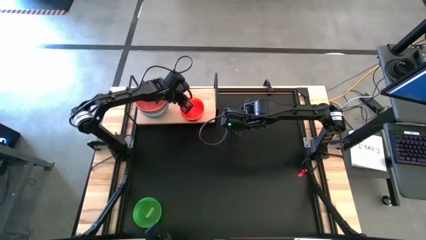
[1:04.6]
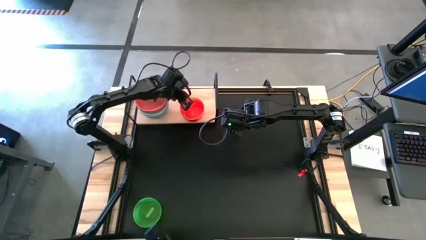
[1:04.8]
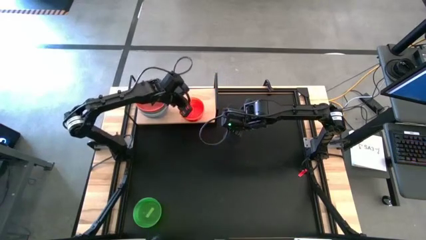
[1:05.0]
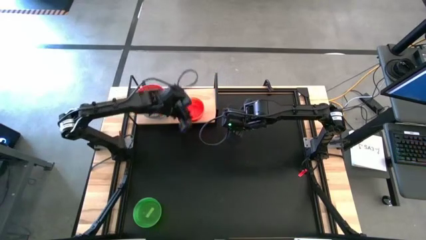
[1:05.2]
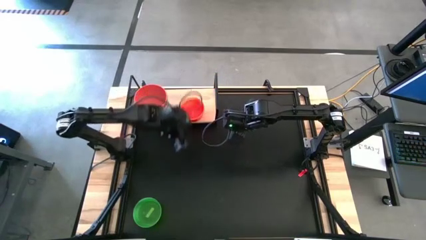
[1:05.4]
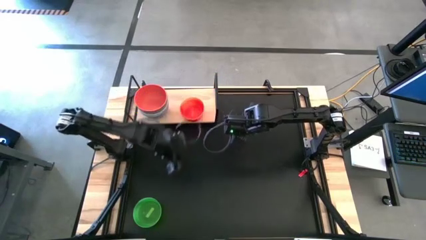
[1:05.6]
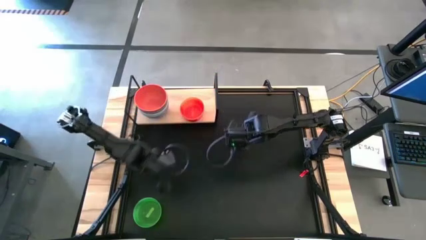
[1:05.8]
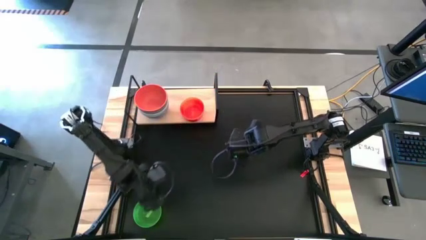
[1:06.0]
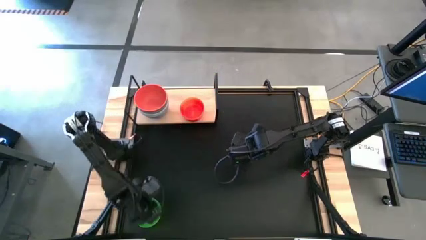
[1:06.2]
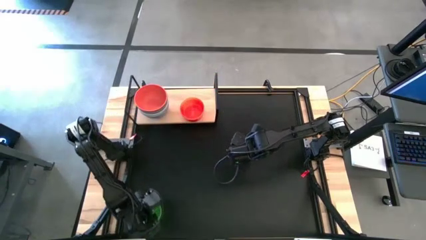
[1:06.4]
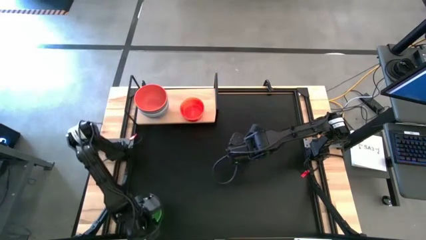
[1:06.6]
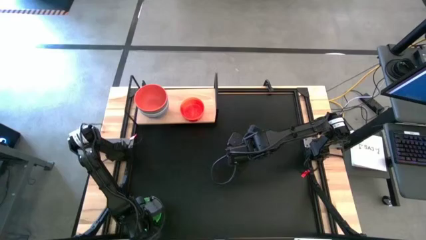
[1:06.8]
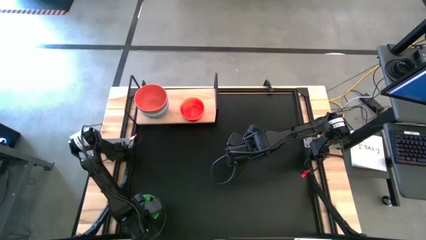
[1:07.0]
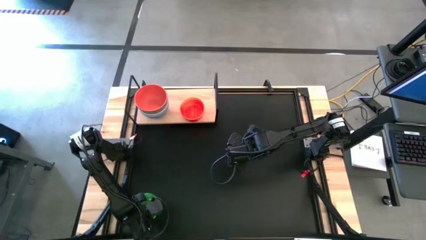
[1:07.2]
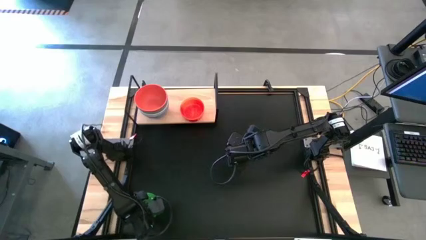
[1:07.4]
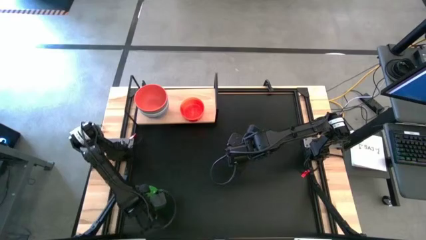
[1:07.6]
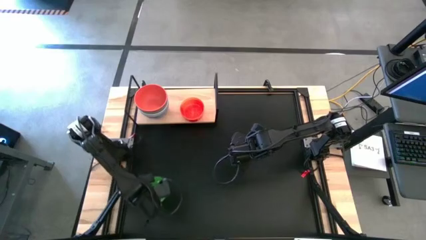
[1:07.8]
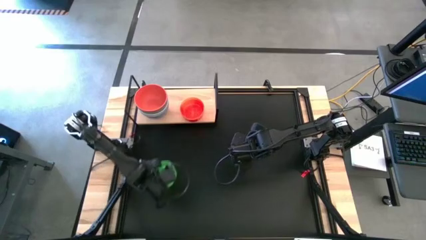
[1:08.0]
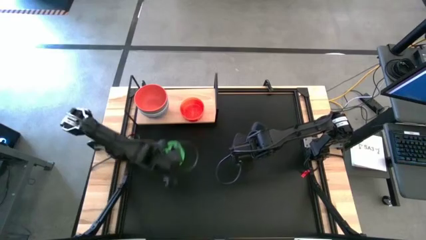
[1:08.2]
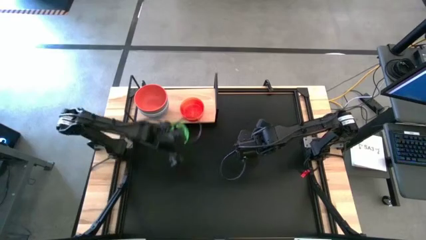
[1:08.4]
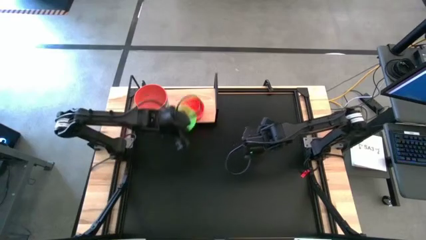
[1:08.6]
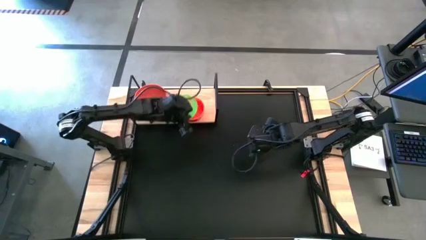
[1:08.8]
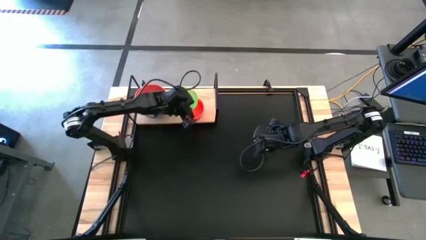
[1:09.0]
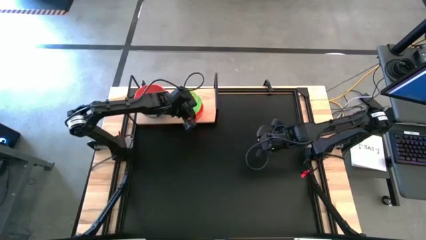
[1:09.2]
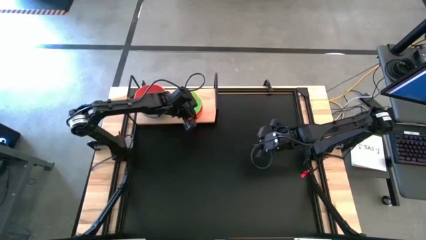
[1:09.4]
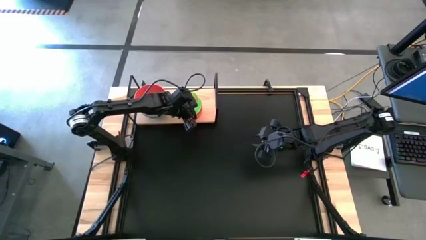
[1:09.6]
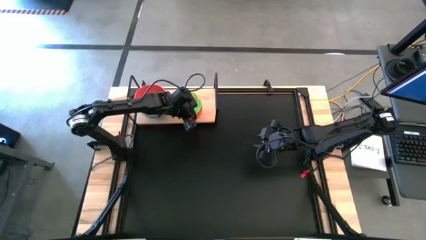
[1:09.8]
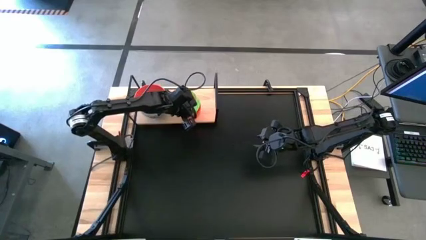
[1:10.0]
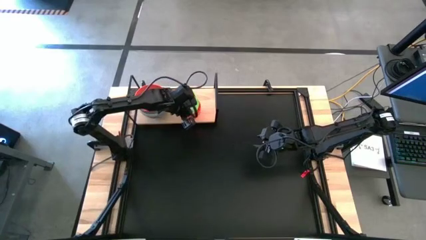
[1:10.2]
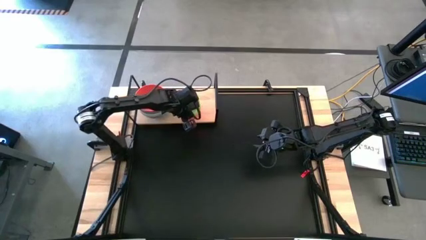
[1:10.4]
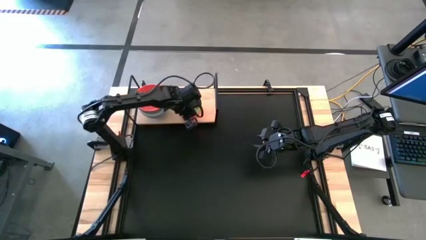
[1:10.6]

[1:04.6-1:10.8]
Task: Place and stack bowls onto a shelf
Stack the light green bowl on top of the light orange bowl on the shelf

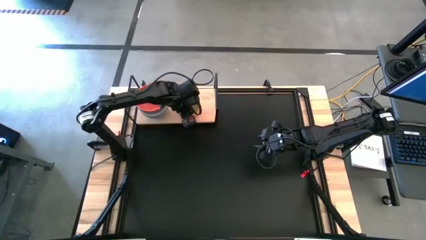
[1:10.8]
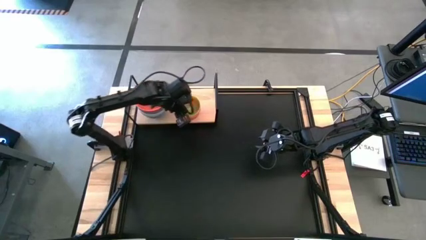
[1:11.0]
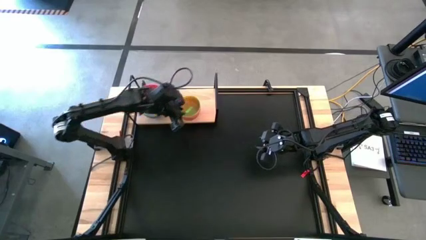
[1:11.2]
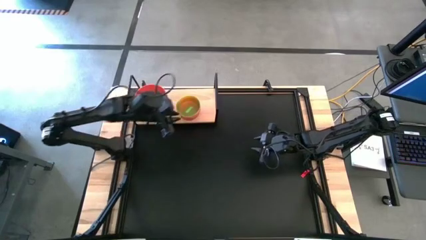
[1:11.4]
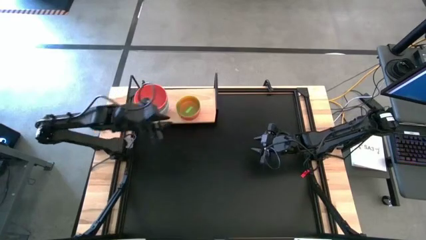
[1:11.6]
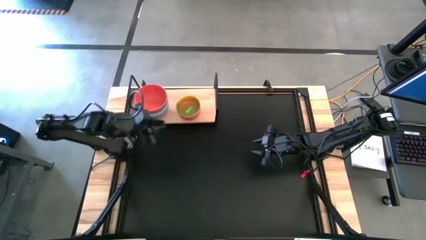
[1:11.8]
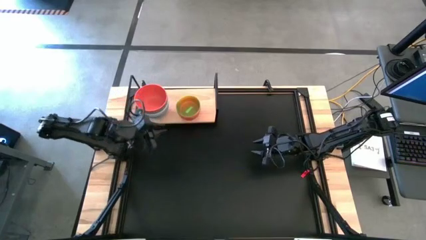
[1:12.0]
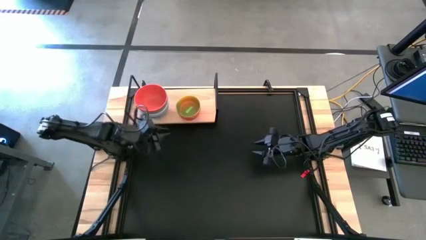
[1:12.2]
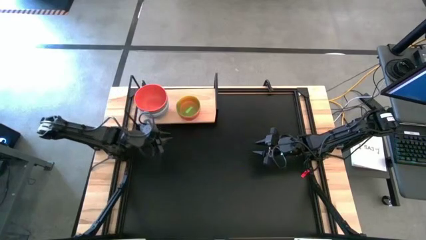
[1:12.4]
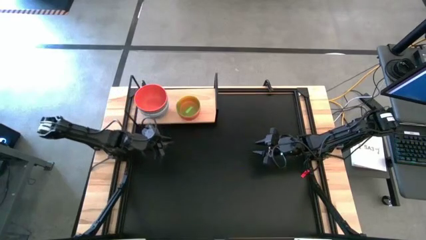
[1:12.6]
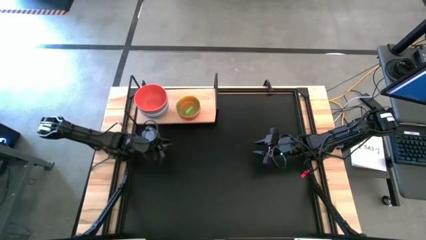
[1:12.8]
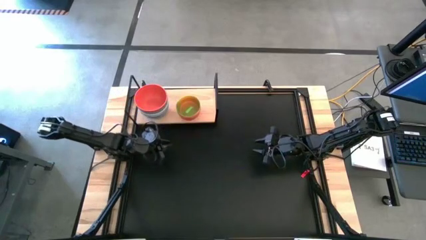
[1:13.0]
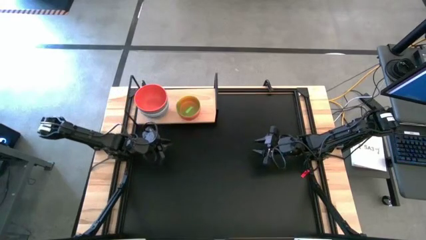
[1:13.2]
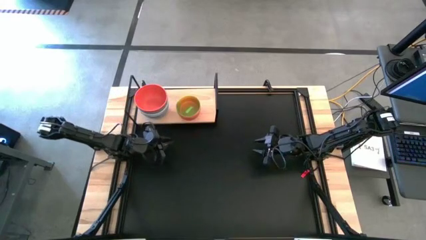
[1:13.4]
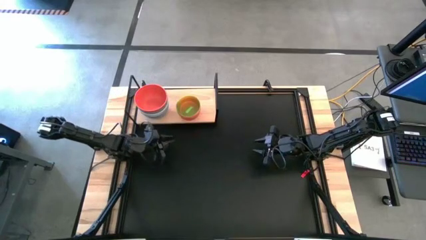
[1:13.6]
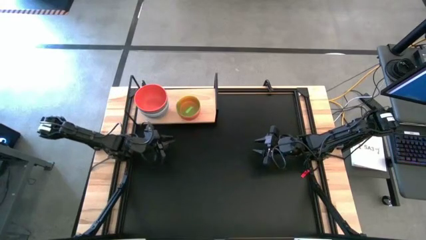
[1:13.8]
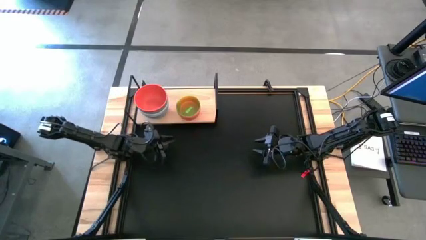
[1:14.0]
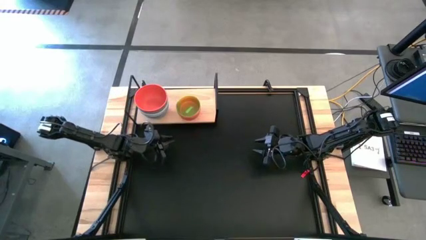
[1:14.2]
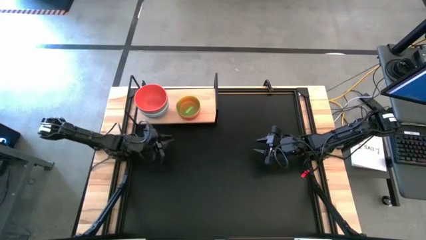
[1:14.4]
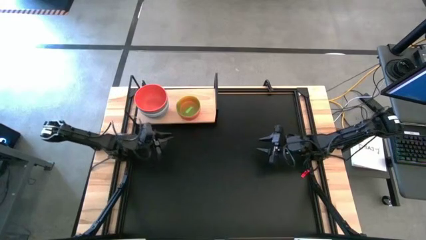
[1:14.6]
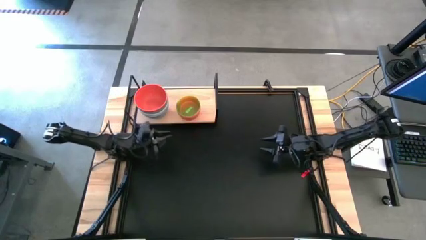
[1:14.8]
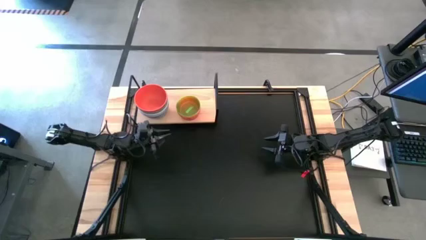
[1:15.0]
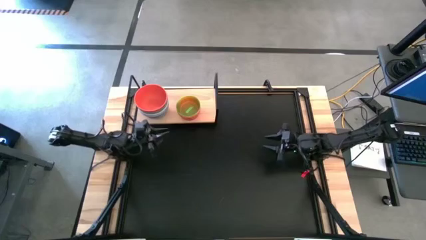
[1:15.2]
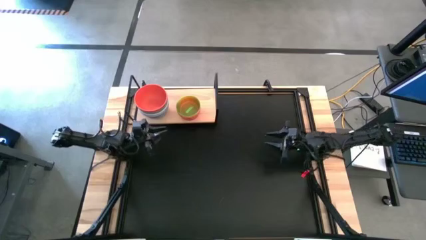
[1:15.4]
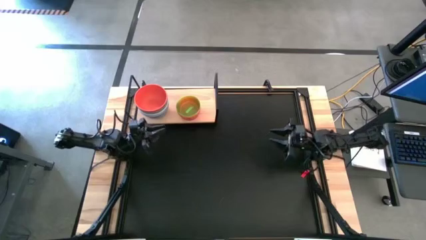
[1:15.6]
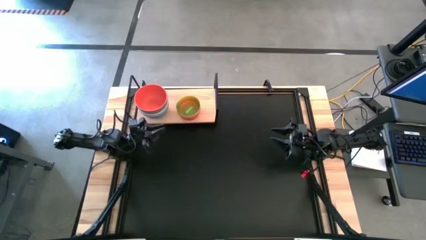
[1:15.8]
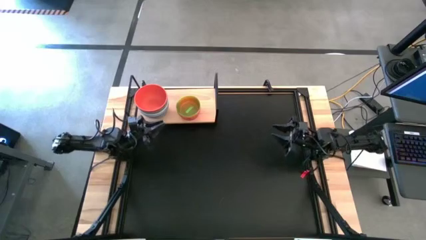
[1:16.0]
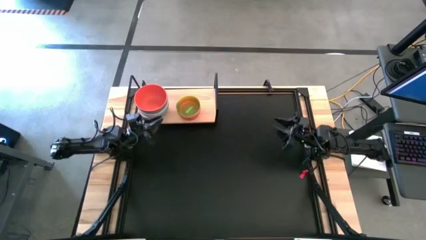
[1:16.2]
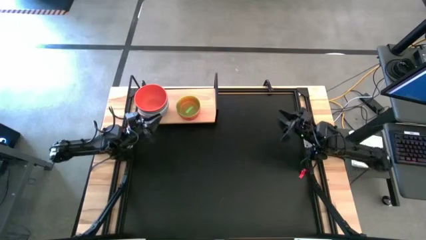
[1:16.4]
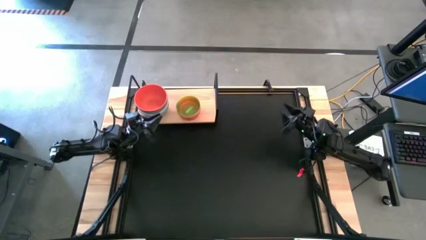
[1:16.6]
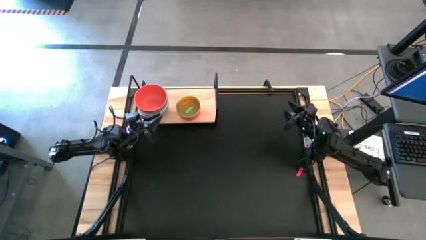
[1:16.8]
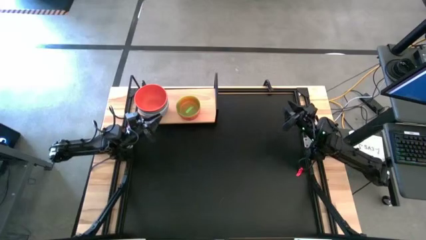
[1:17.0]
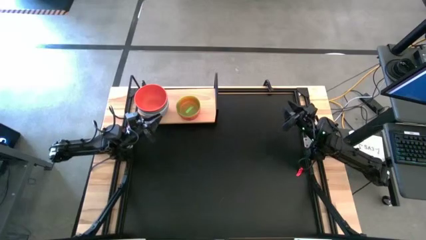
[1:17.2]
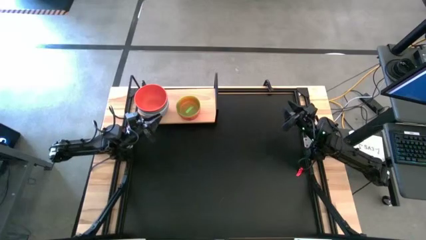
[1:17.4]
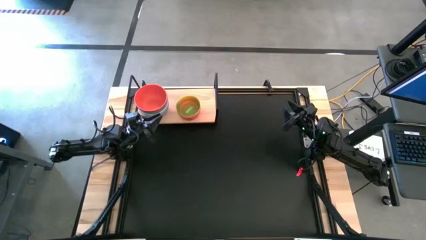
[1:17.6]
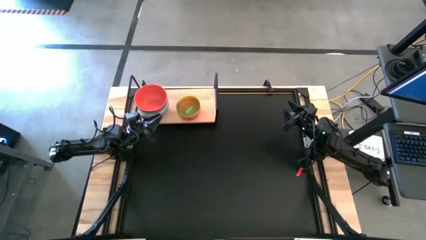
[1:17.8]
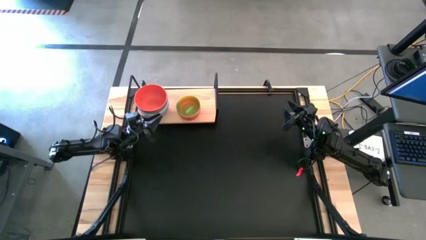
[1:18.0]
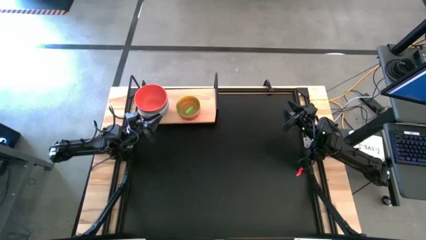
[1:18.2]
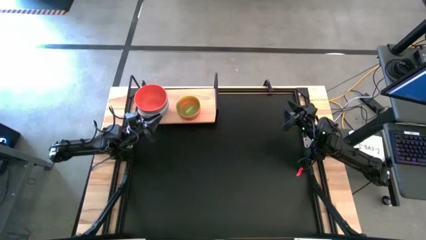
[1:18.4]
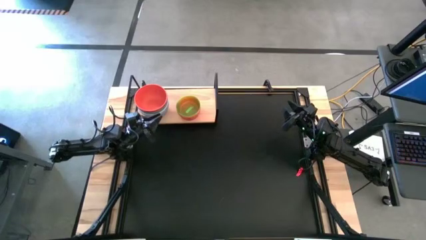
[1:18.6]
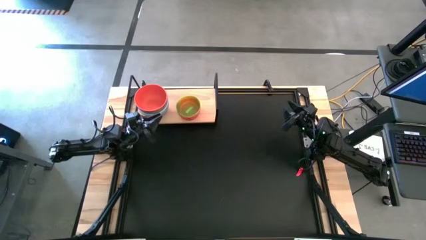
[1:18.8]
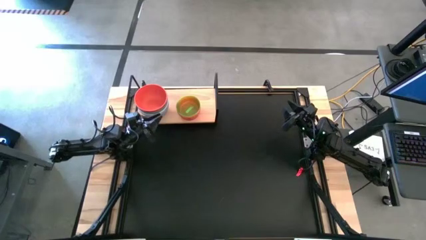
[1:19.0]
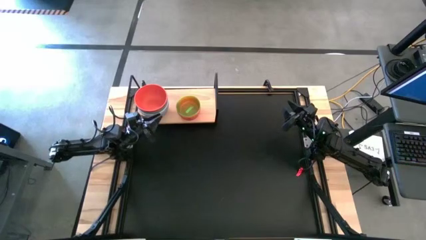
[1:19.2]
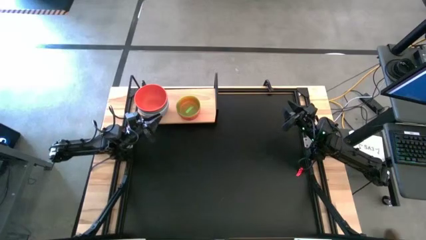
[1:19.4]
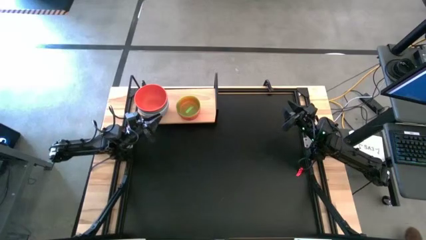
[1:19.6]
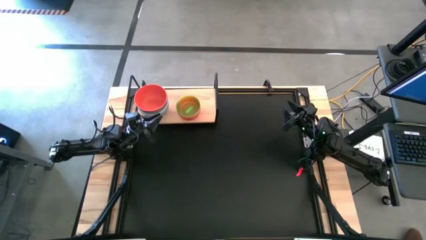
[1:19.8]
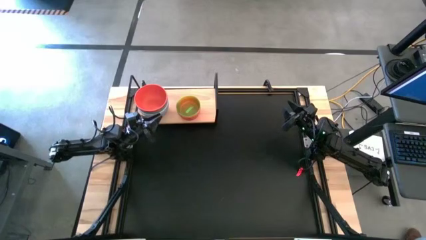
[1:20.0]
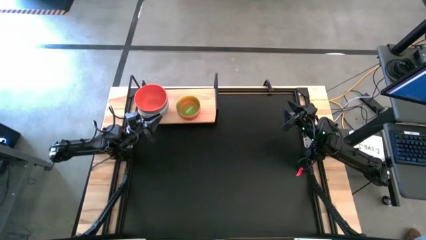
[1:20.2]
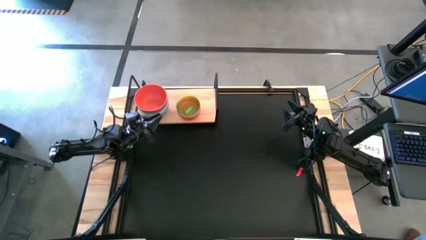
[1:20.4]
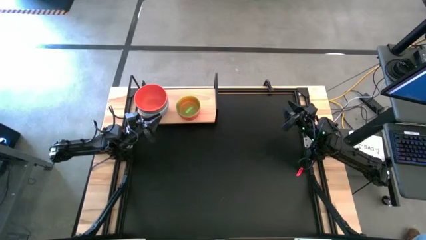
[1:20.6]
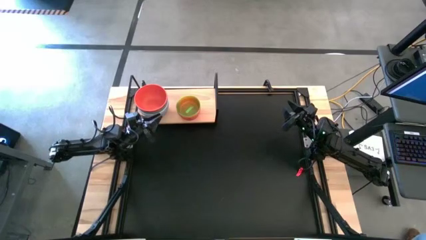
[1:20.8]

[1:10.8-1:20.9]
Return to Home Position
